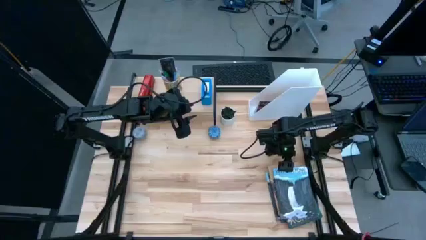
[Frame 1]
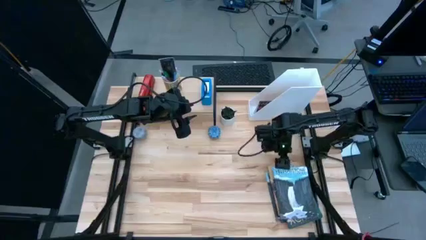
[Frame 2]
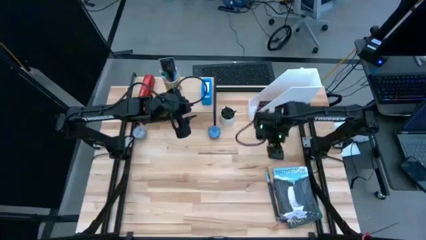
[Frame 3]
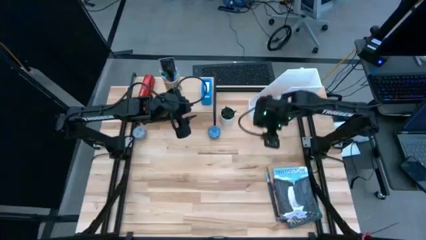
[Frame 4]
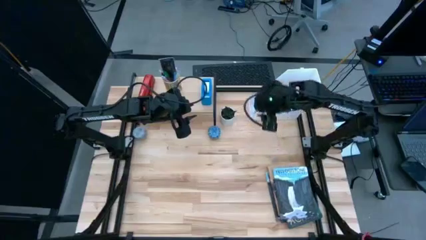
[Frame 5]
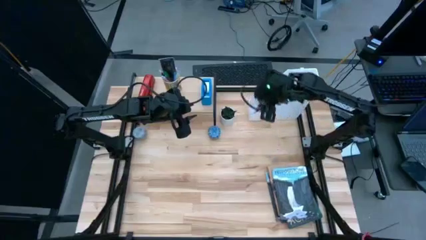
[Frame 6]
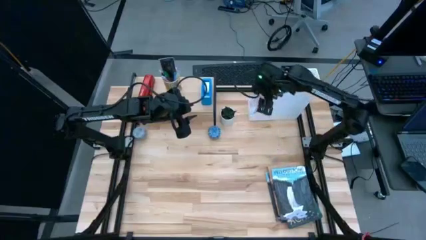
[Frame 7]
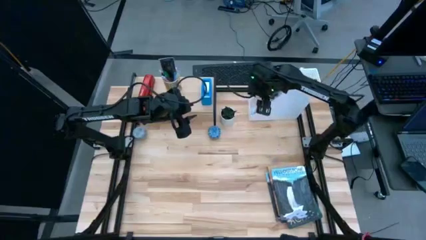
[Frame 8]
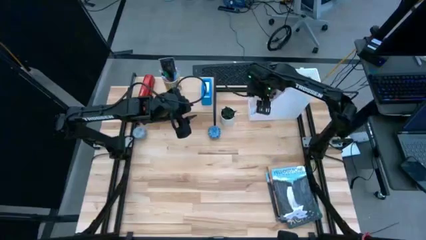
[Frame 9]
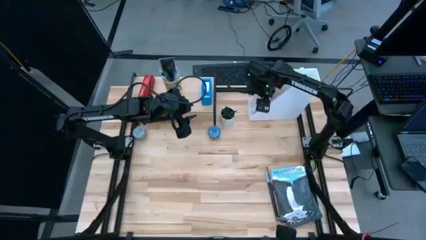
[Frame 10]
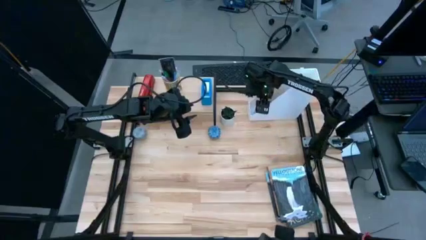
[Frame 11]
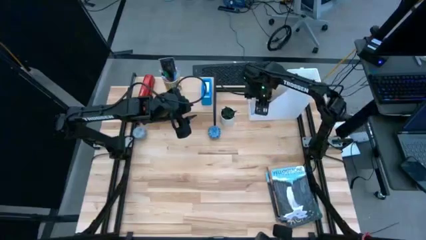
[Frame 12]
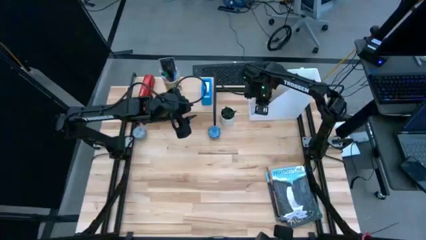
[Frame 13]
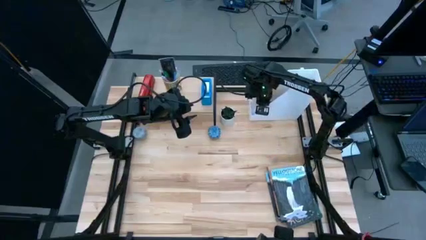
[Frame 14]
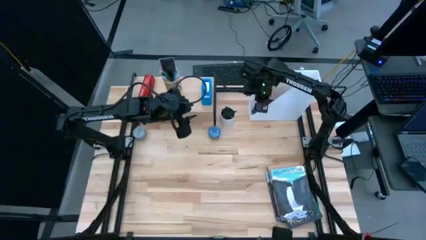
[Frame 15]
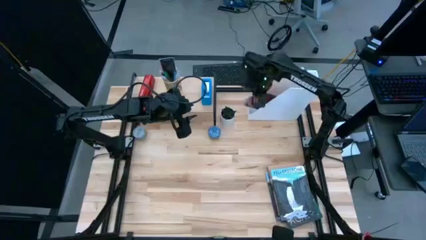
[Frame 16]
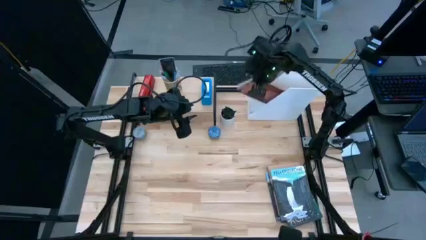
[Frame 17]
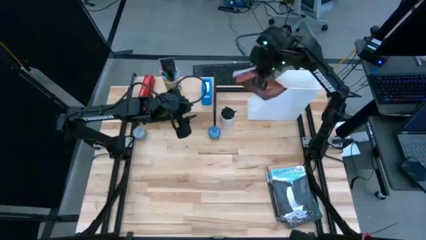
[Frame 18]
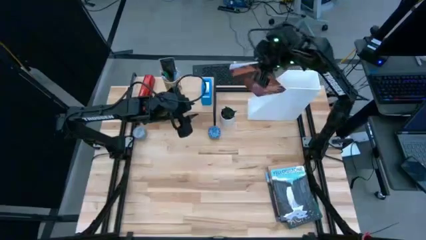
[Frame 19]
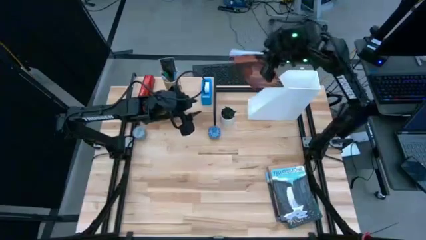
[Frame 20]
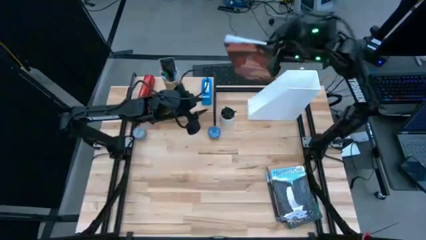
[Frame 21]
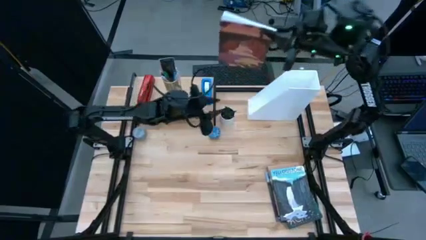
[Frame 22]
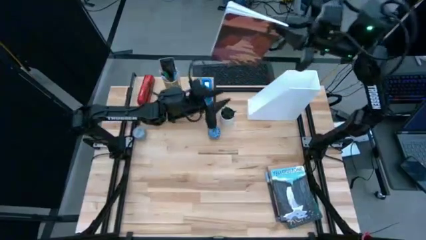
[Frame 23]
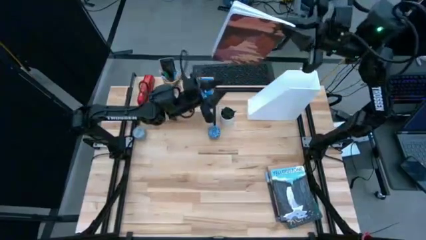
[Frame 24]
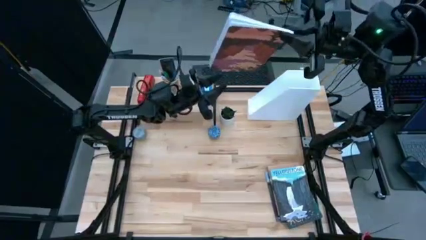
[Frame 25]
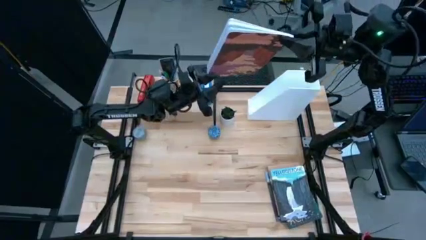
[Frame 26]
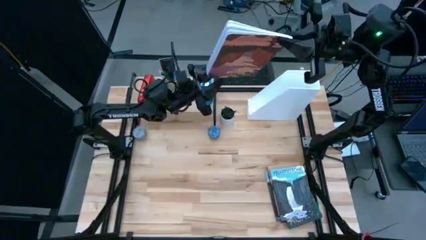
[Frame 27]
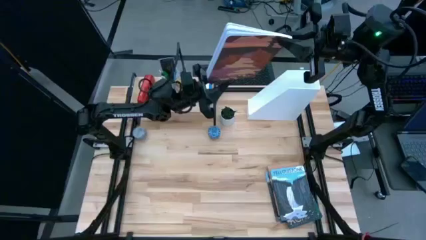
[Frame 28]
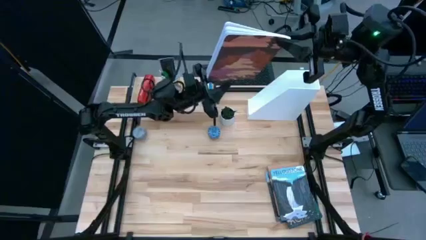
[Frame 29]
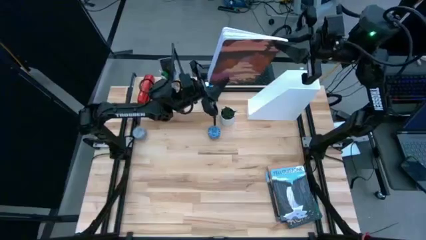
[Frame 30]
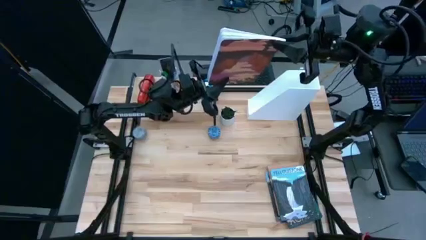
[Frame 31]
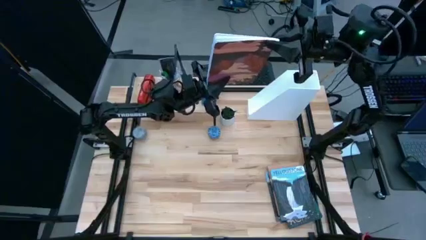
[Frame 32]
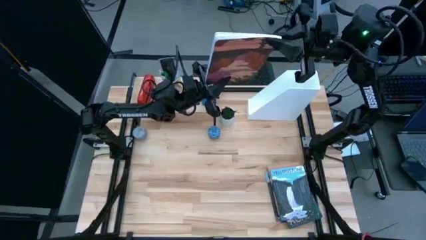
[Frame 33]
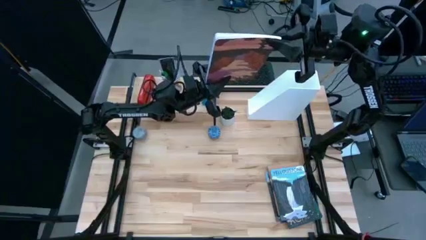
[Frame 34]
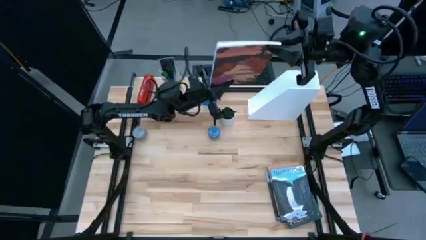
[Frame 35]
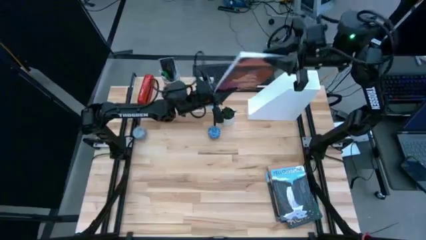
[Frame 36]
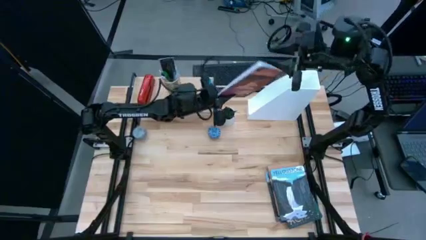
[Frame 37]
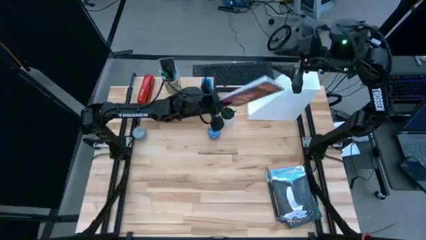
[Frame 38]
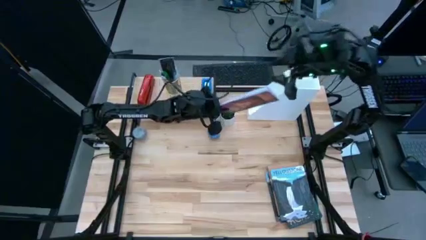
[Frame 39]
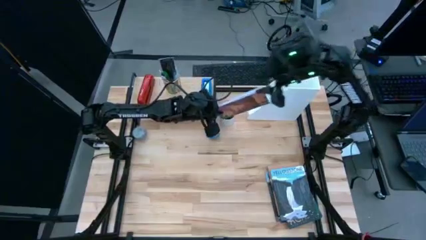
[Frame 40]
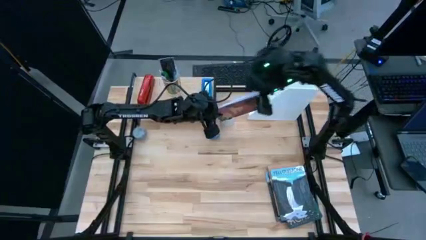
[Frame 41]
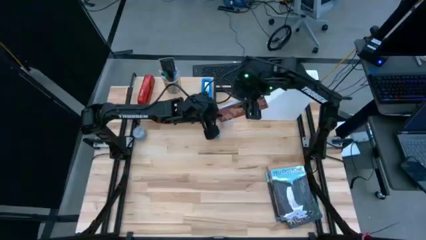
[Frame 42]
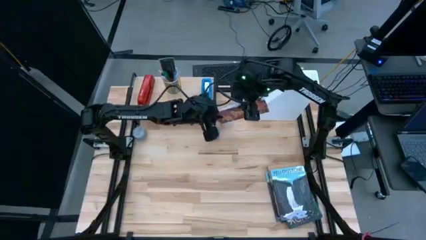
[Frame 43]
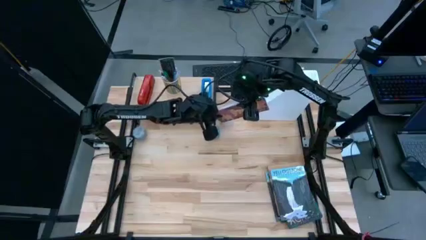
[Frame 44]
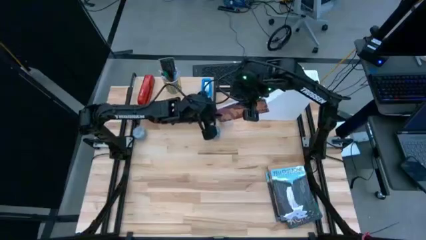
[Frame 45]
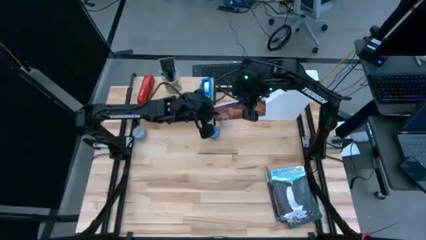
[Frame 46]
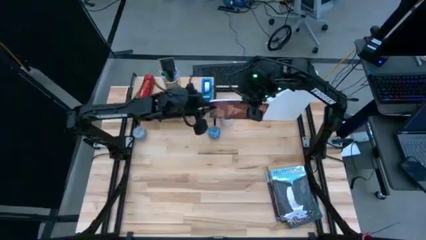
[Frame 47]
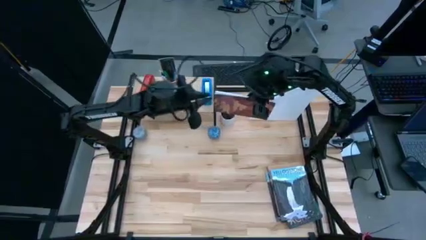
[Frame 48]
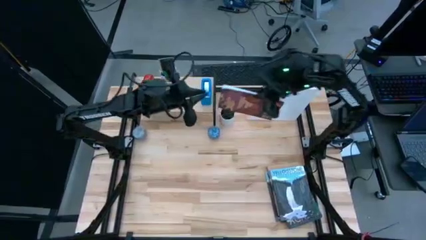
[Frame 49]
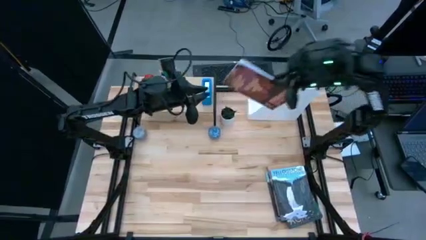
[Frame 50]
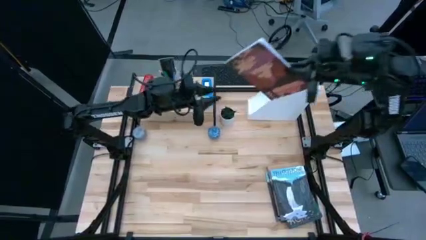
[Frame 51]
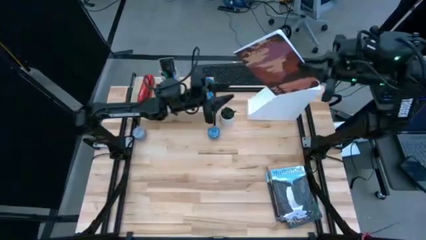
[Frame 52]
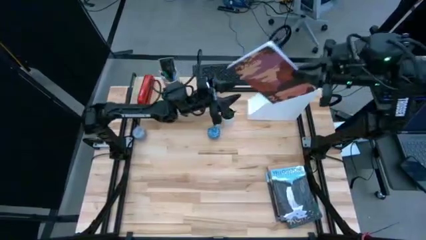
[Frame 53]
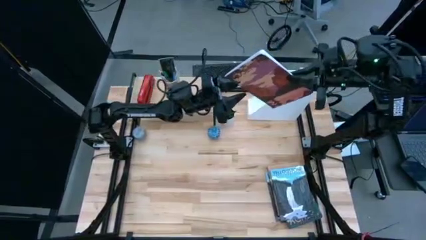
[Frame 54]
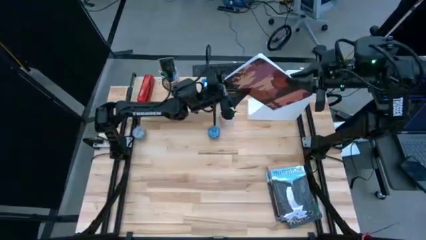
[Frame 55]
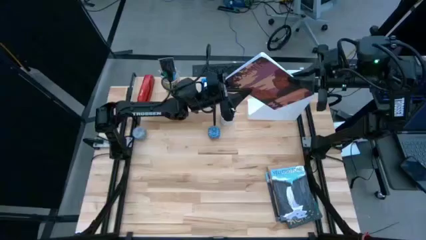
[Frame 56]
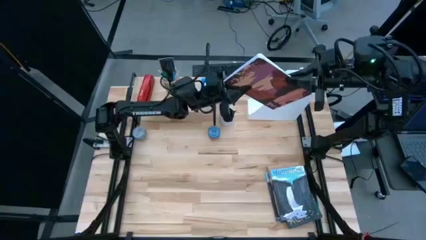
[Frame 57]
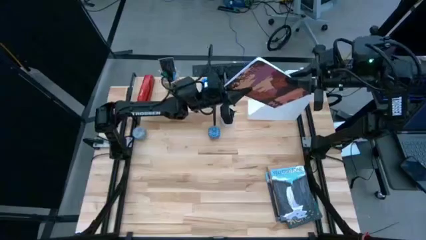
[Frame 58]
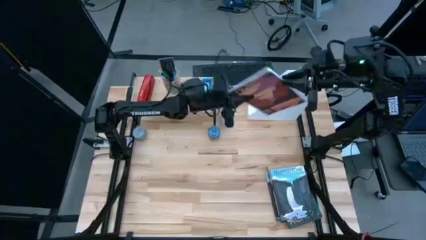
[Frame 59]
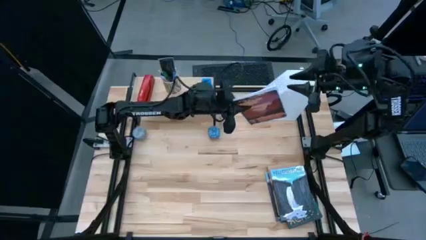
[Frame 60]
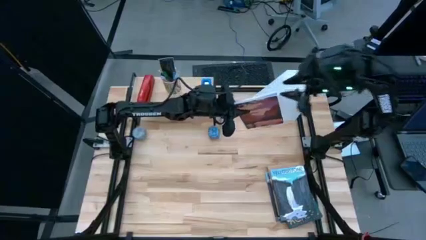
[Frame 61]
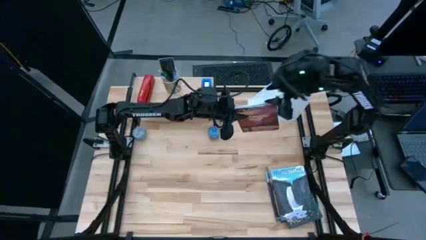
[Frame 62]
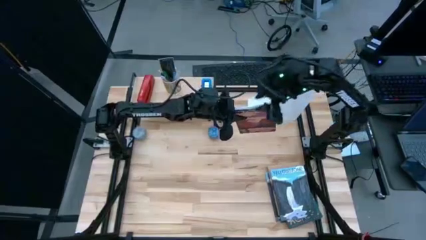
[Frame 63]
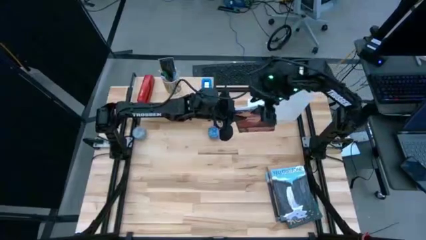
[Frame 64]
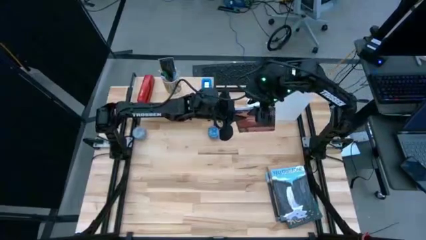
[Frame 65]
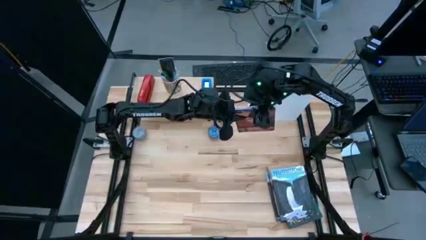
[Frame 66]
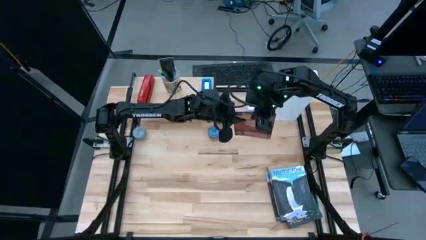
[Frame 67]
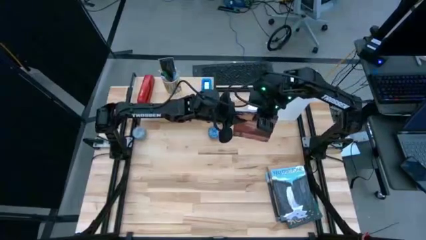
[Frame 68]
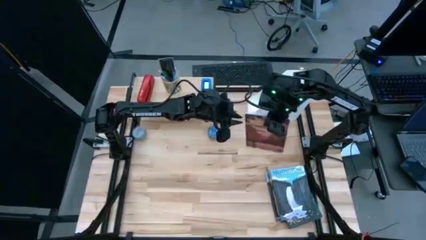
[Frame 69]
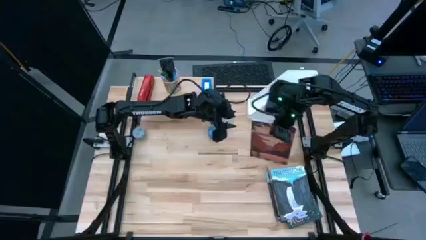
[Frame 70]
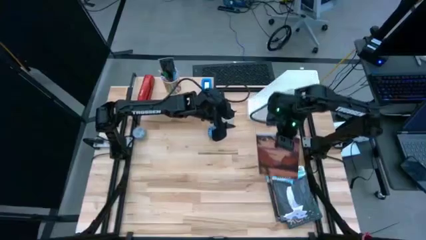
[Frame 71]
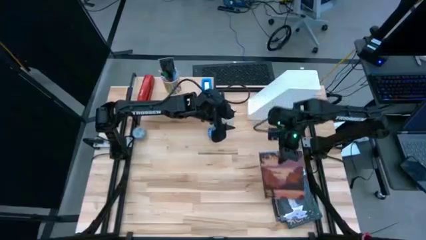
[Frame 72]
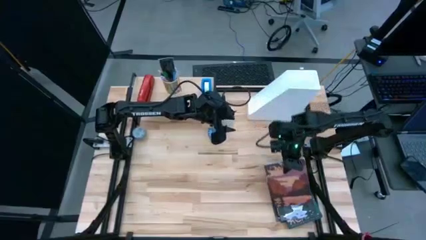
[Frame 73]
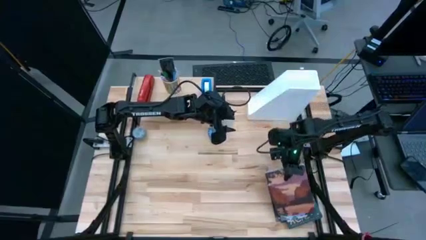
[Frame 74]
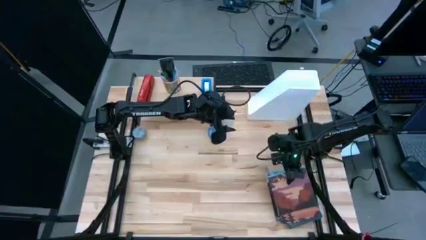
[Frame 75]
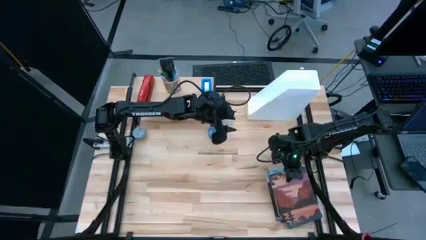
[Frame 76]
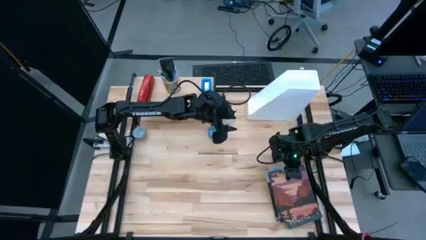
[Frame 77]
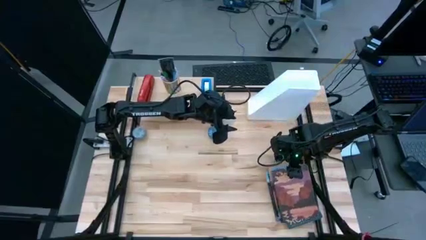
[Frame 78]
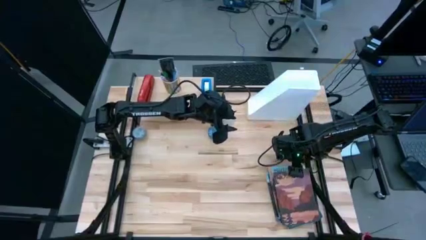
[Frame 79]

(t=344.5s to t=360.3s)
Task: Stock shelves
Remove the purple/brown book from the white book shelf

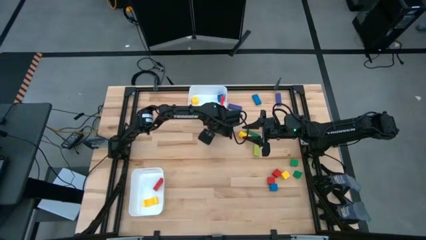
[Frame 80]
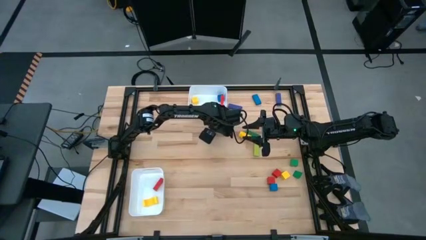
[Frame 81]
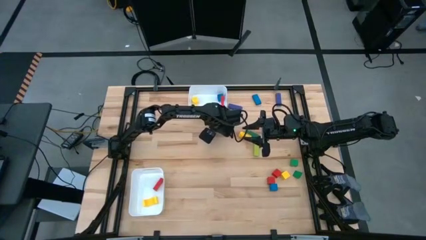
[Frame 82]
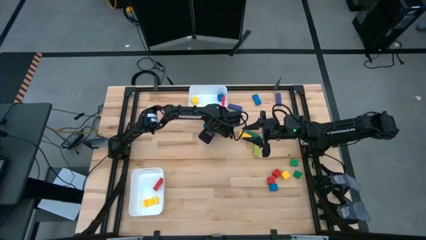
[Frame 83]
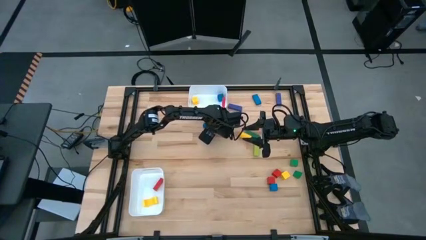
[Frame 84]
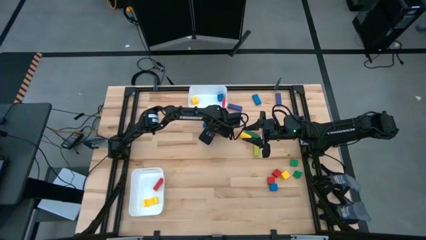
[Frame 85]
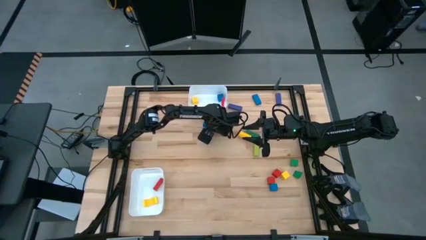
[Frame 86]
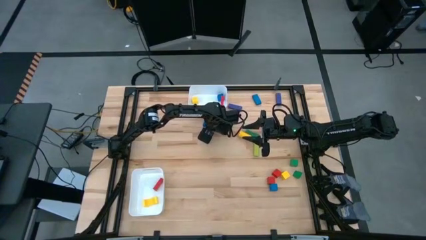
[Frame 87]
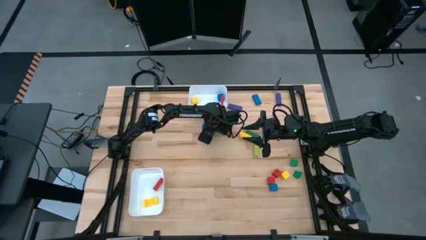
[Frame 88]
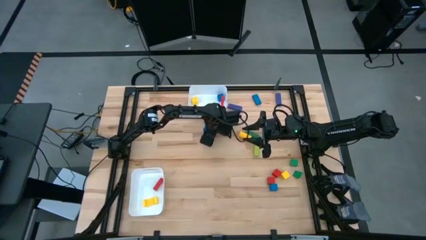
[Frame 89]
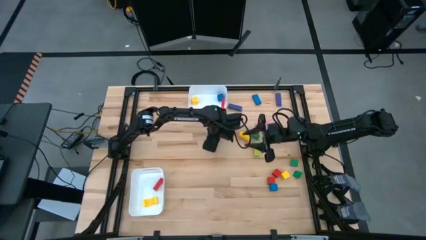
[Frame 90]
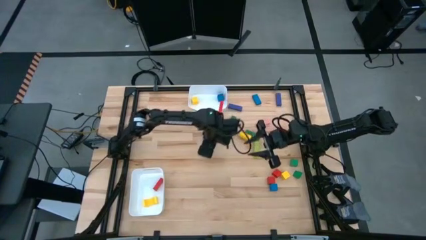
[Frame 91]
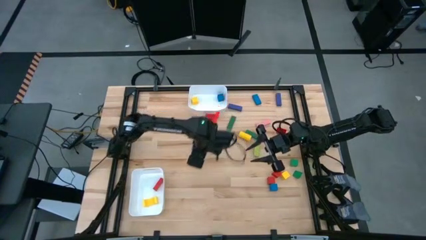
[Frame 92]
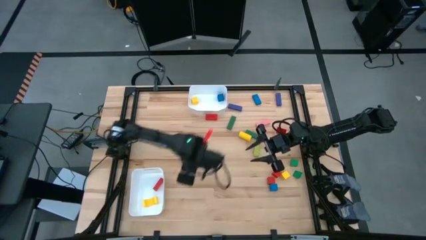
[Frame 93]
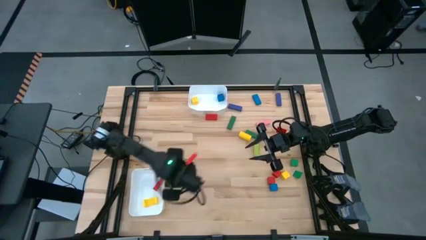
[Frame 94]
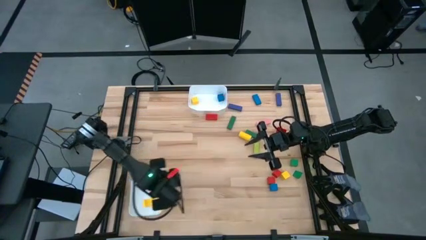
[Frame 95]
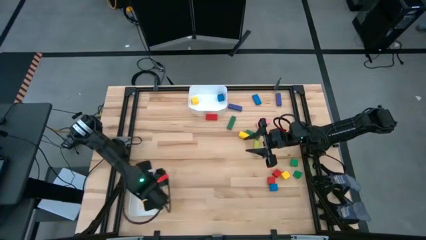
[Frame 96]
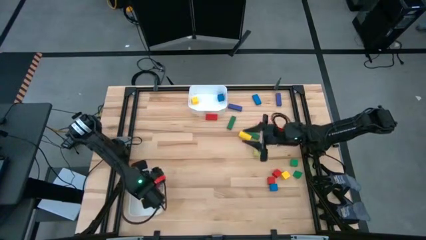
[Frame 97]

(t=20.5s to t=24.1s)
Task: Sort blocks by size
Put the blue rectangular block into the bottom white bin
